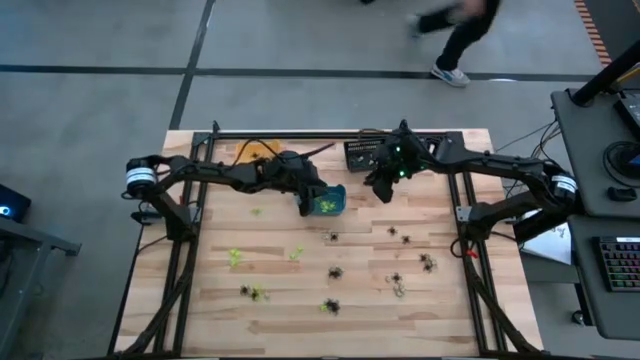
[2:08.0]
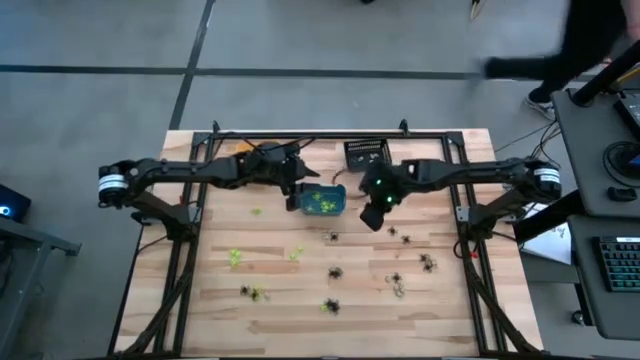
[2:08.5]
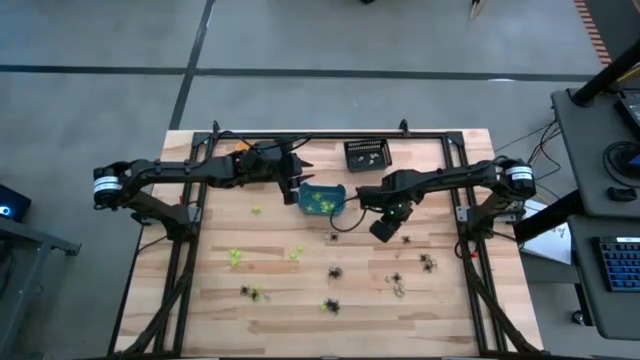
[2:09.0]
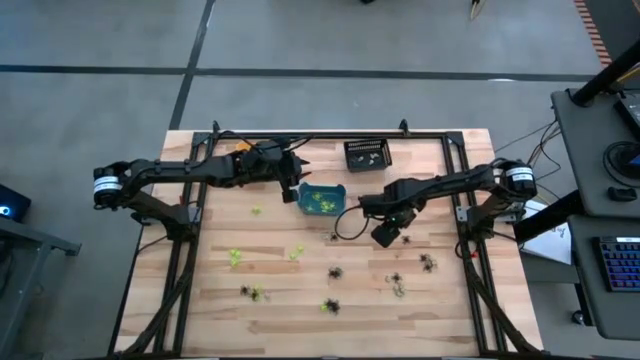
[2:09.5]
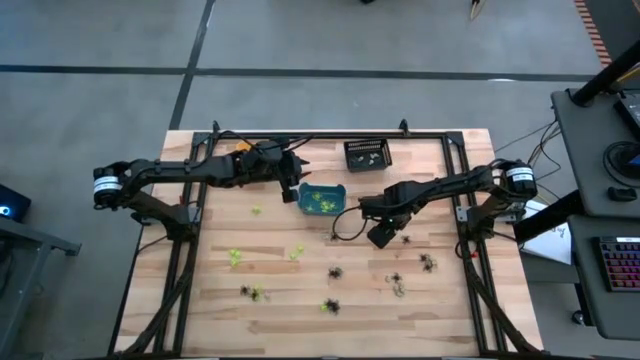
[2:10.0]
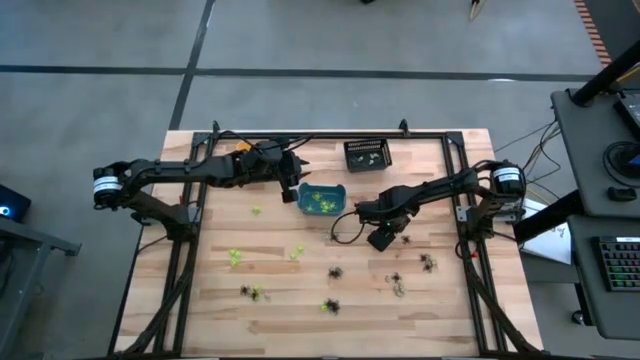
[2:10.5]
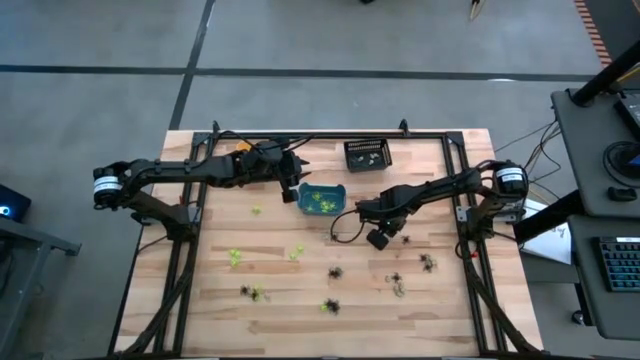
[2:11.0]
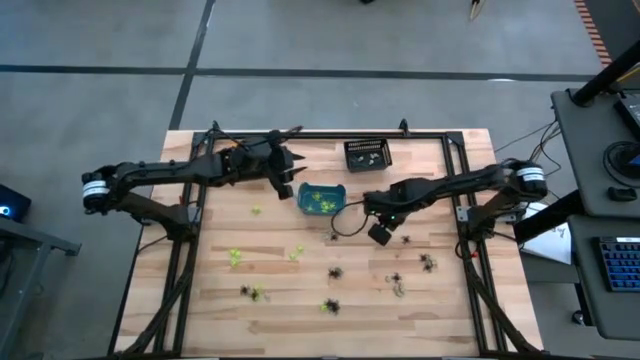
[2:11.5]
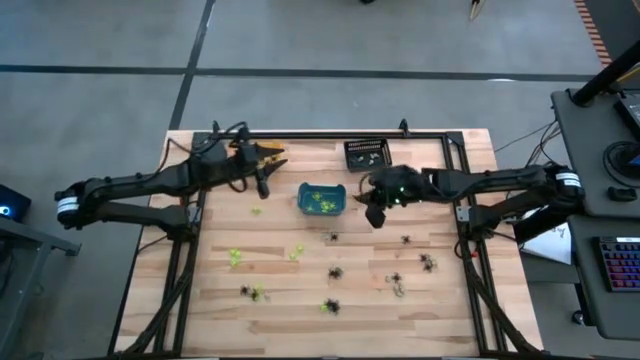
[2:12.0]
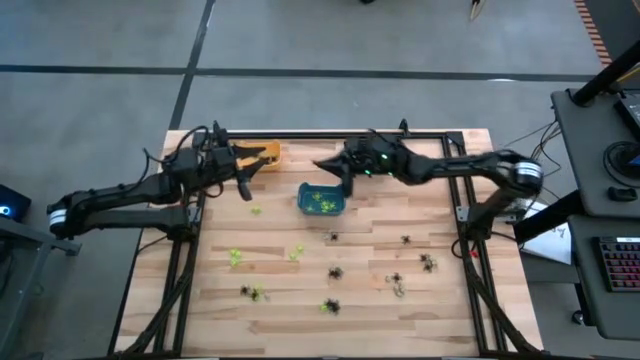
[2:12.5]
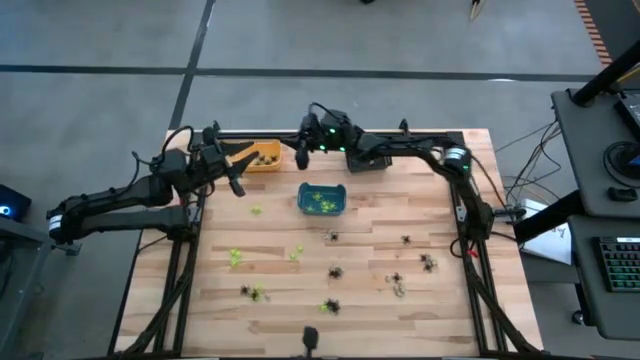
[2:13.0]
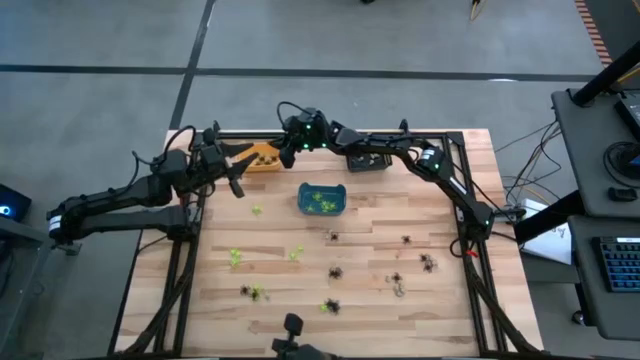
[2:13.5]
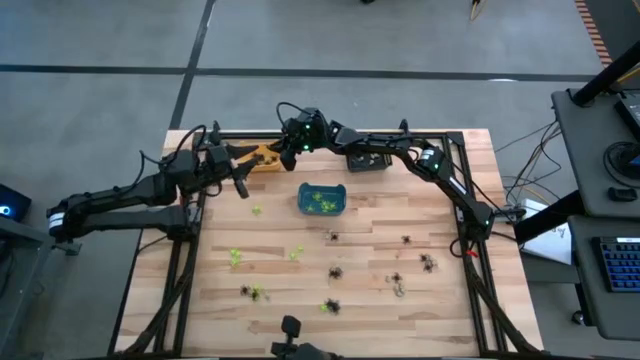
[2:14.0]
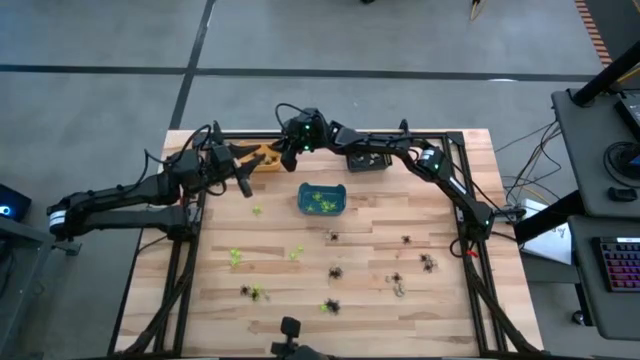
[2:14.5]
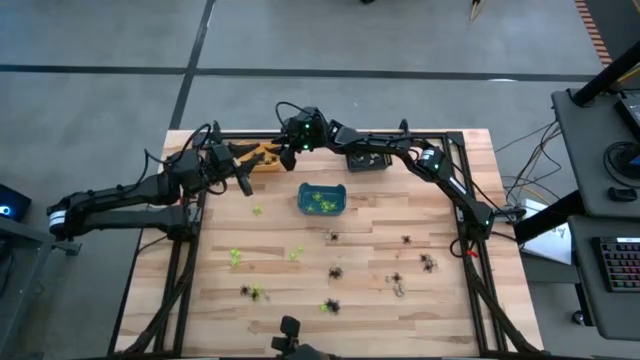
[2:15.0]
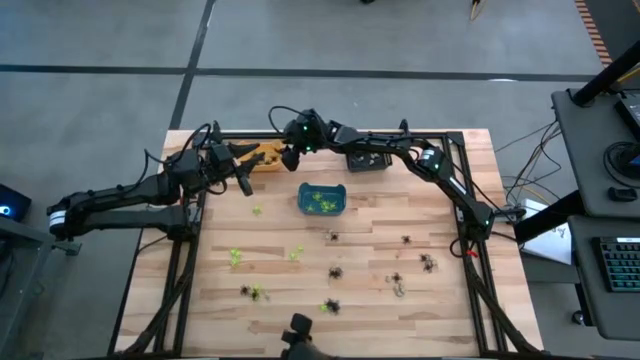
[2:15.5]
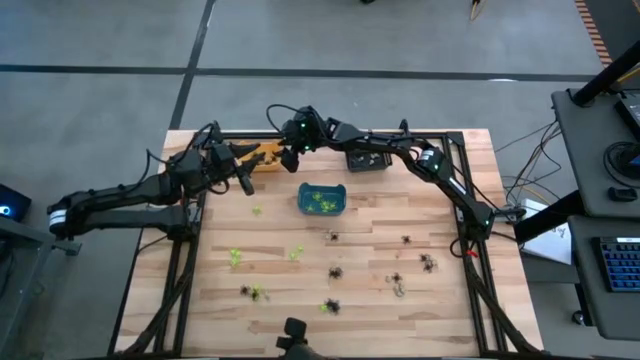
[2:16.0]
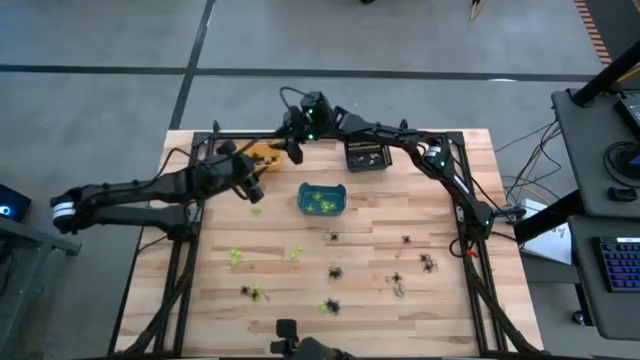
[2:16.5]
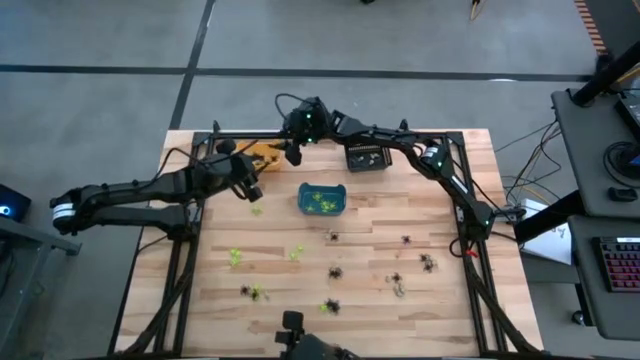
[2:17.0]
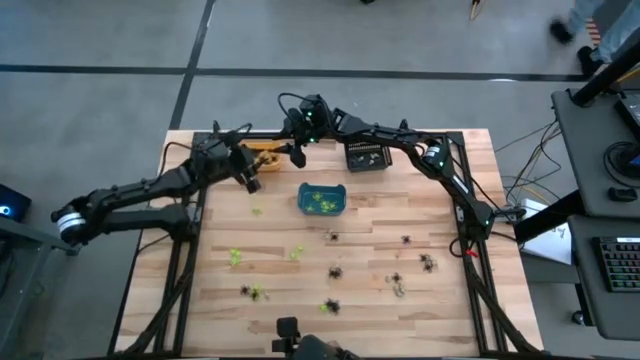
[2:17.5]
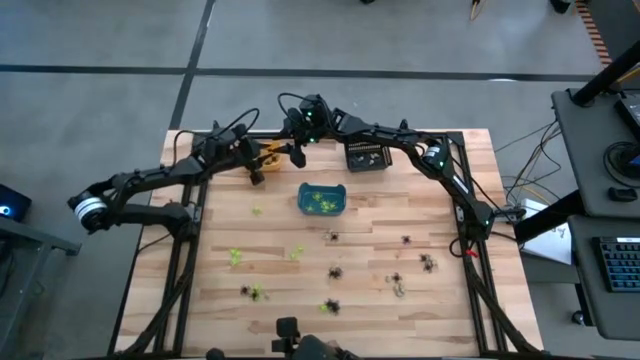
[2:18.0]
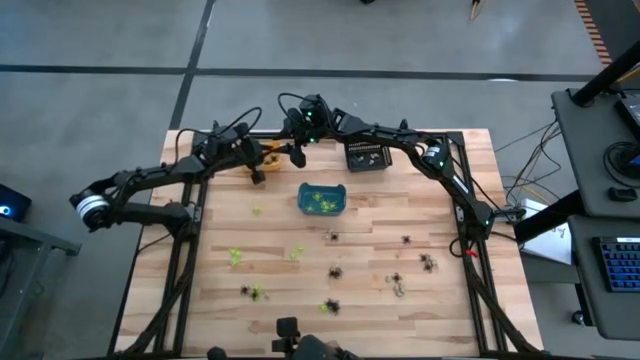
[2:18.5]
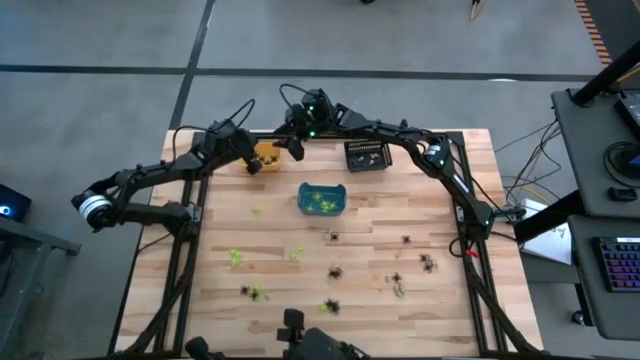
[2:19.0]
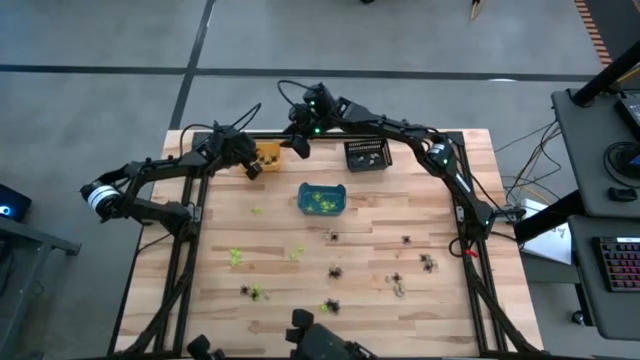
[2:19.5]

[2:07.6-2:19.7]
Task: Sort Halloween decoration
Put the black spider toy into the yellow bin

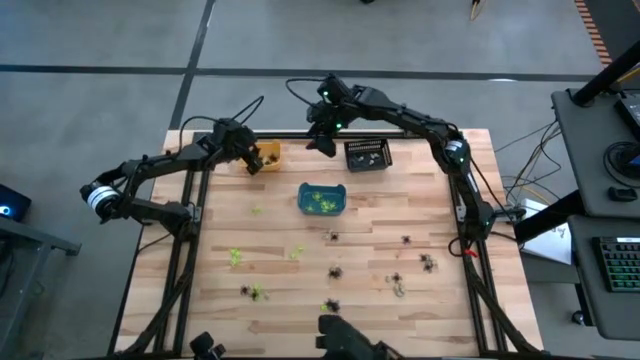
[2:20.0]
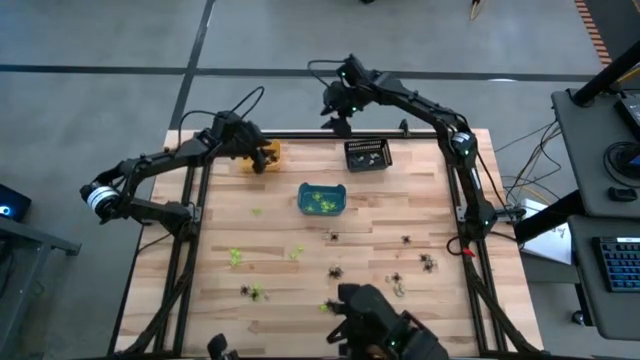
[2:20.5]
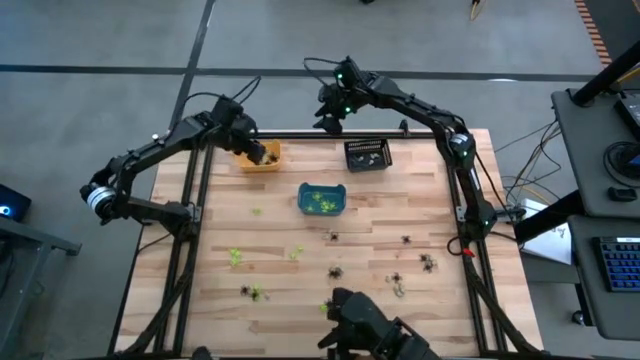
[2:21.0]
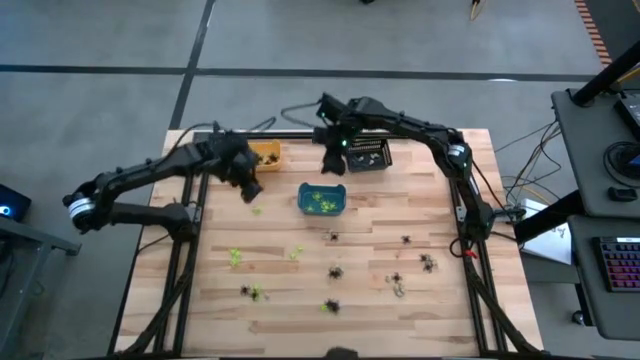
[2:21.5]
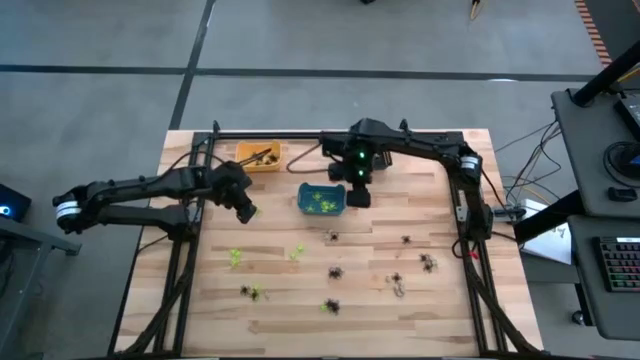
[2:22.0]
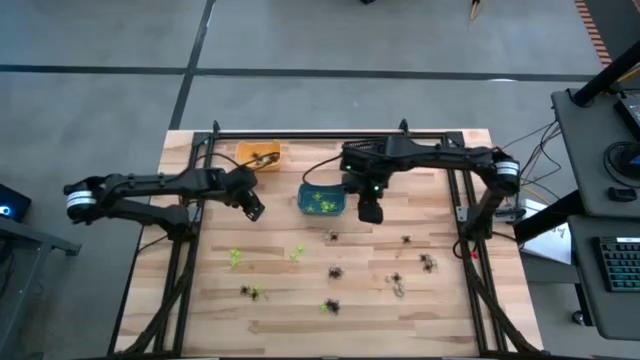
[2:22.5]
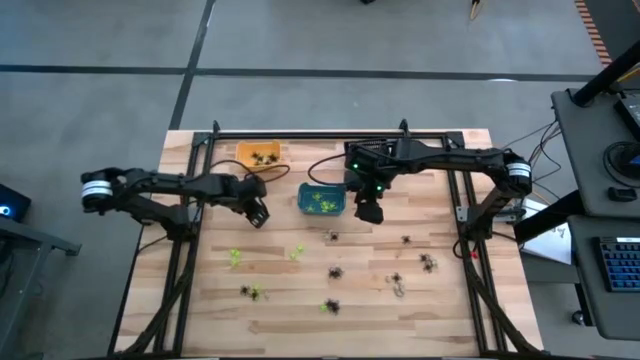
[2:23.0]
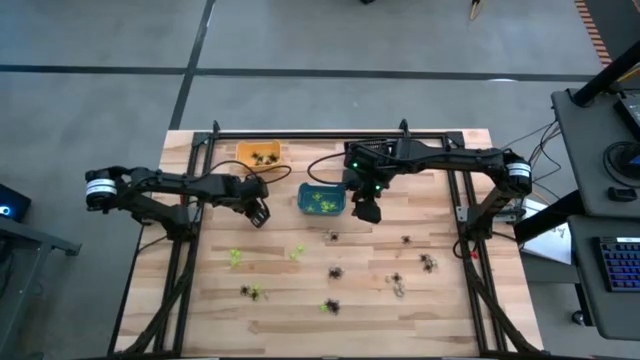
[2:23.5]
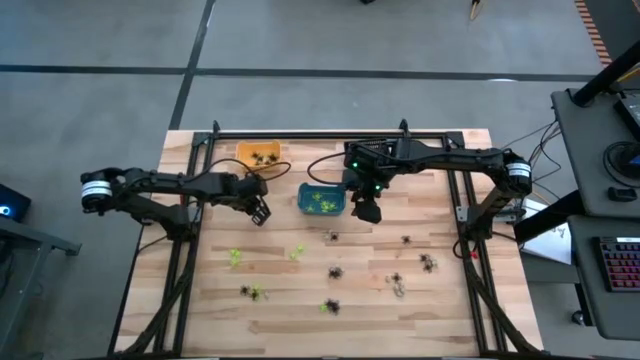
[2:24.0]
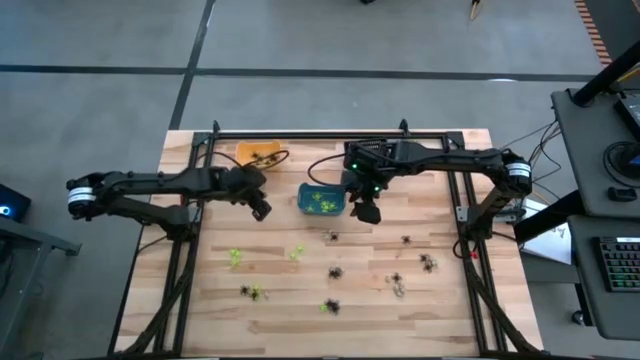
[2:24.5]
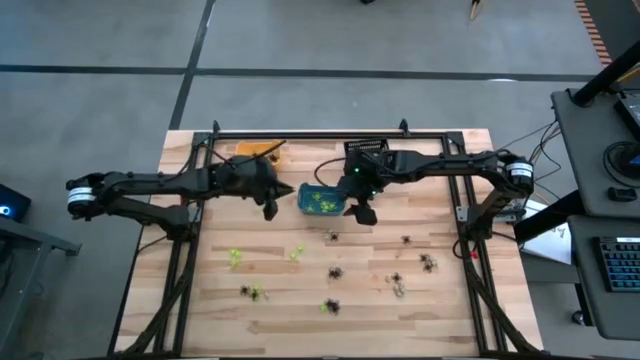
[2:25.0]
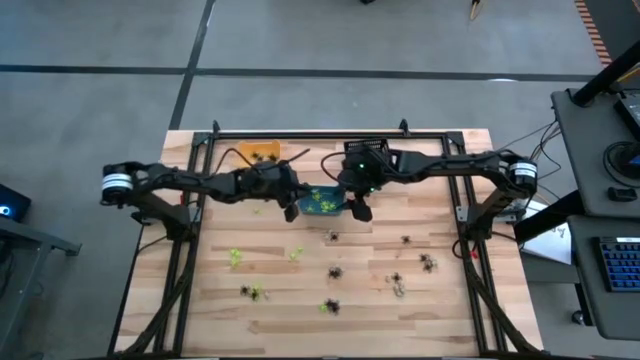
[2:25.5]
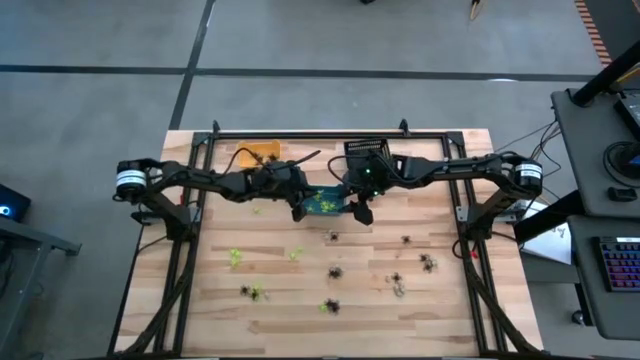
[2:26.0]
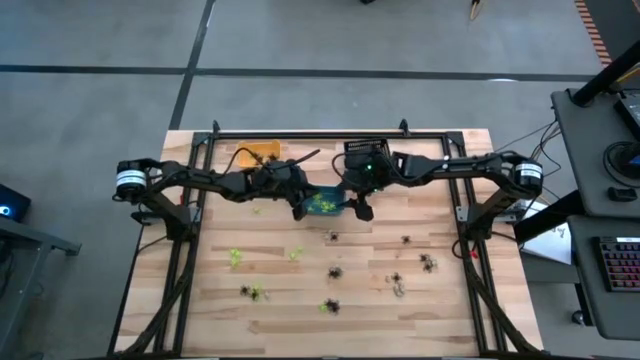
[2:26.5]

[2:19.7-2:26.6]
Put the green spider toy into the blue bin
